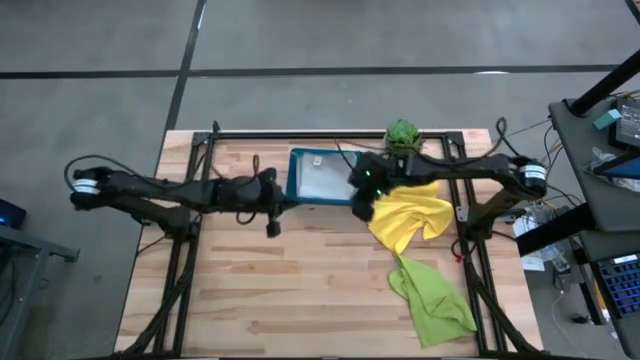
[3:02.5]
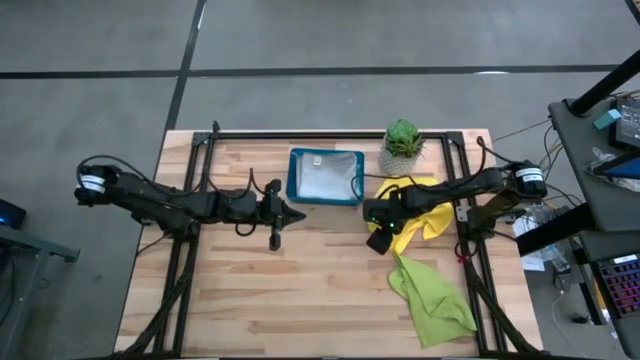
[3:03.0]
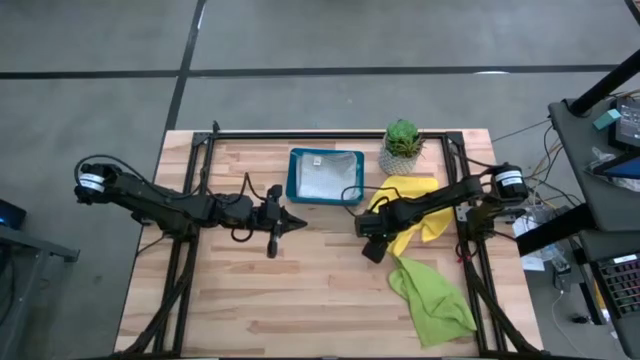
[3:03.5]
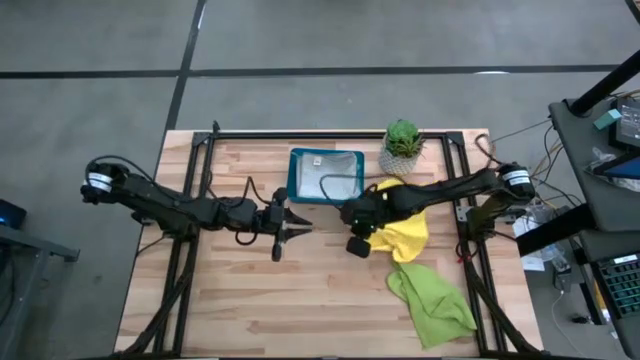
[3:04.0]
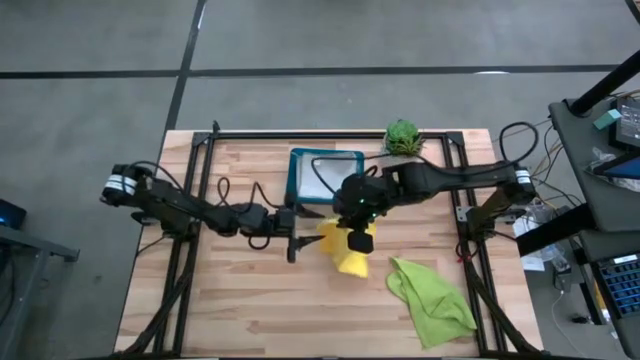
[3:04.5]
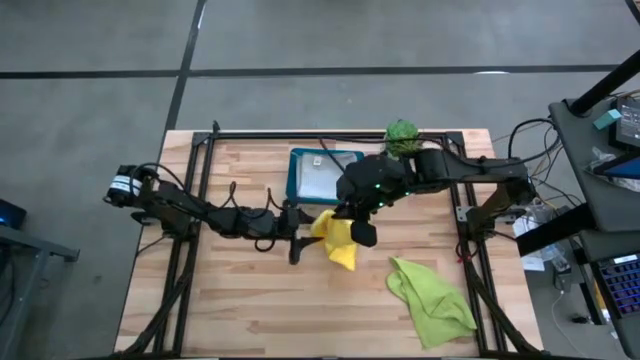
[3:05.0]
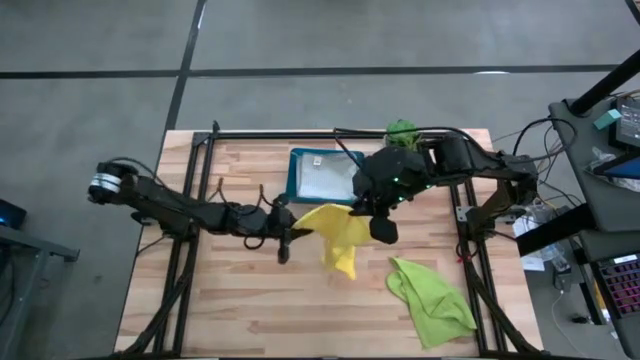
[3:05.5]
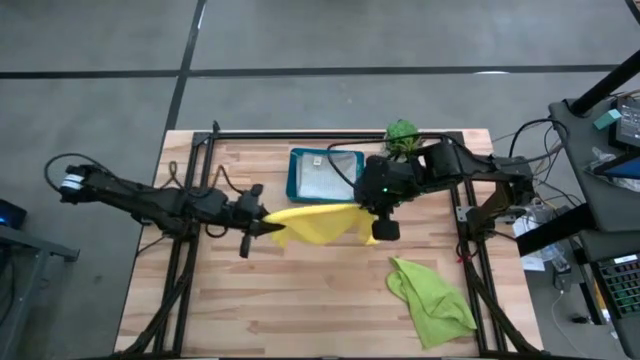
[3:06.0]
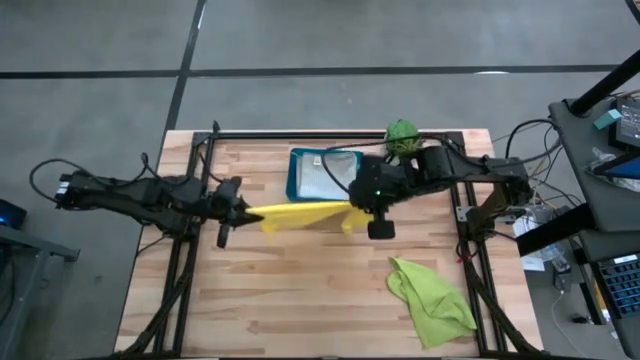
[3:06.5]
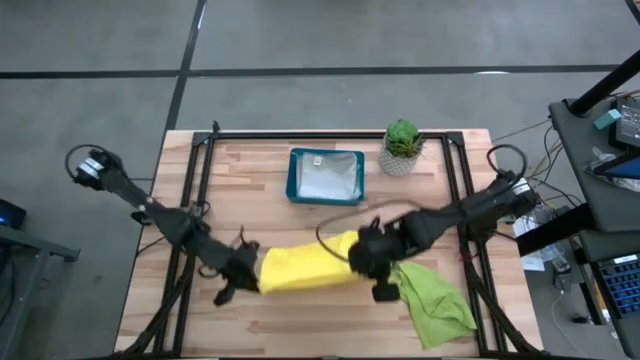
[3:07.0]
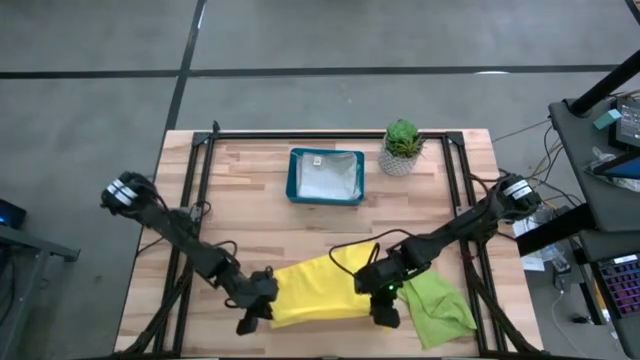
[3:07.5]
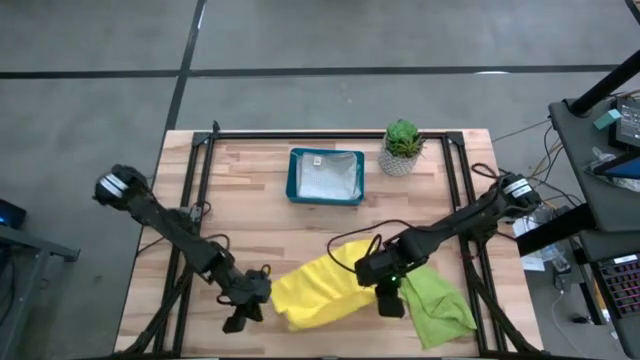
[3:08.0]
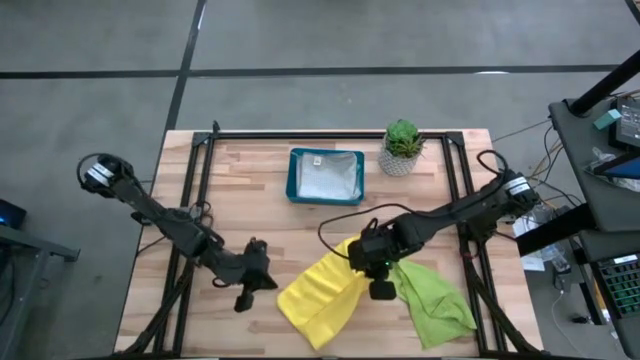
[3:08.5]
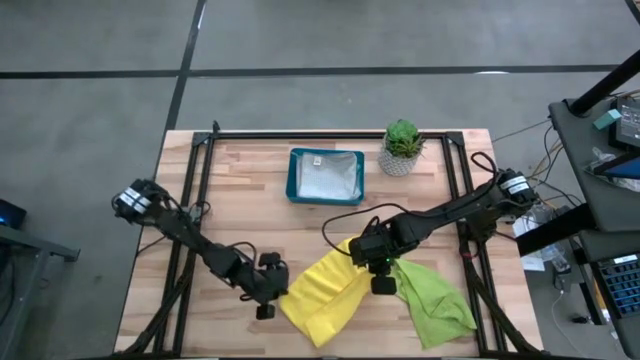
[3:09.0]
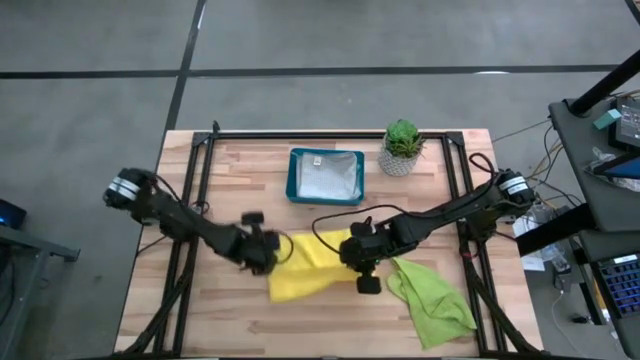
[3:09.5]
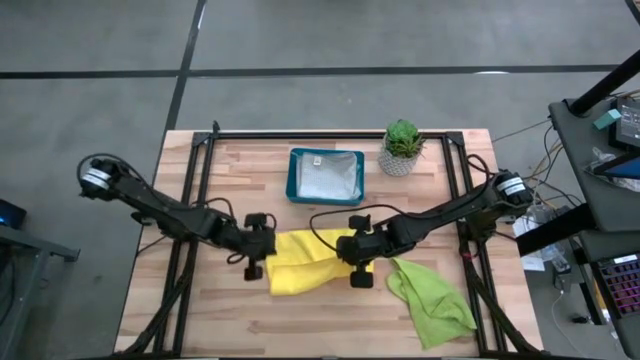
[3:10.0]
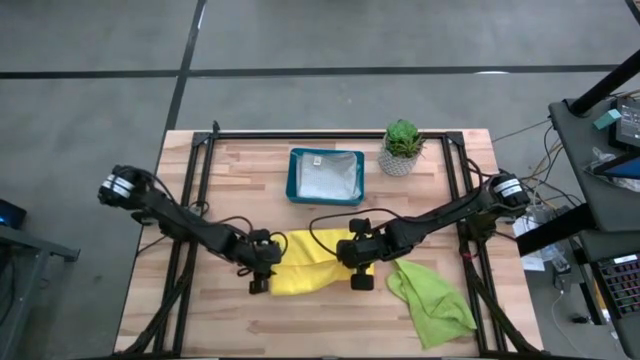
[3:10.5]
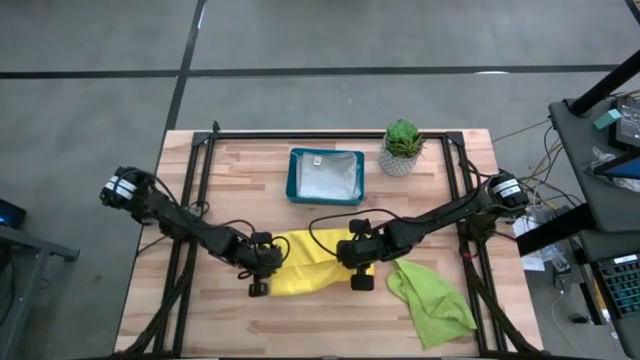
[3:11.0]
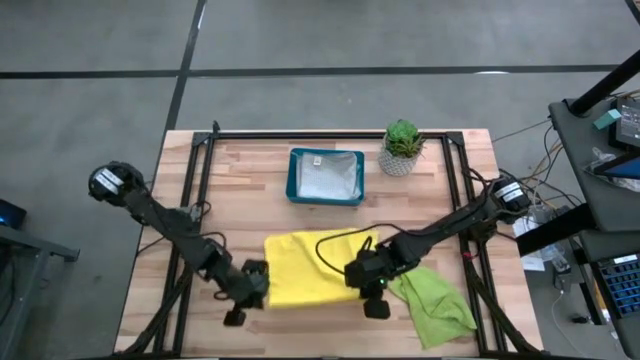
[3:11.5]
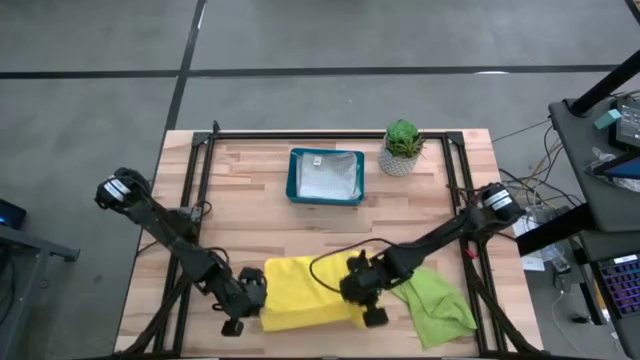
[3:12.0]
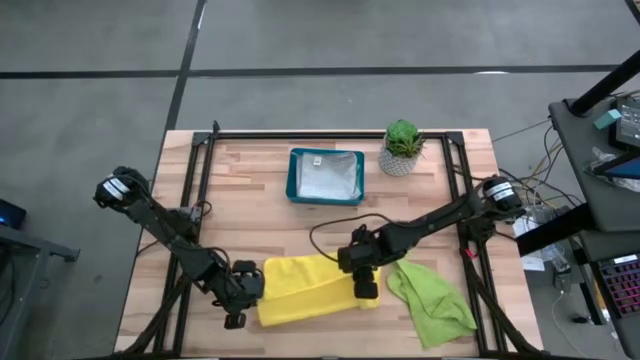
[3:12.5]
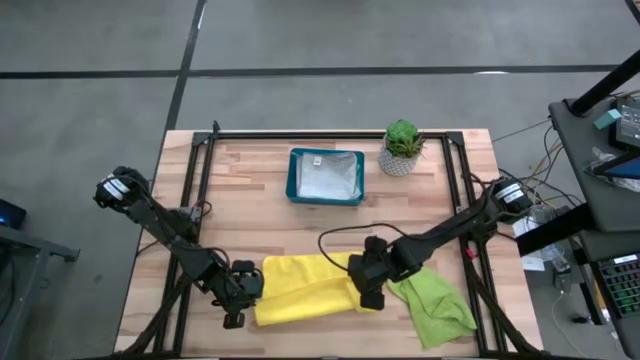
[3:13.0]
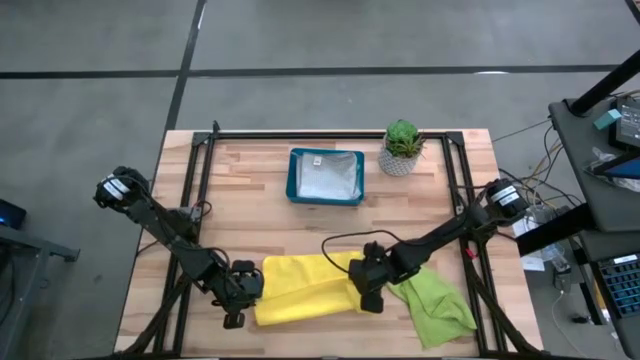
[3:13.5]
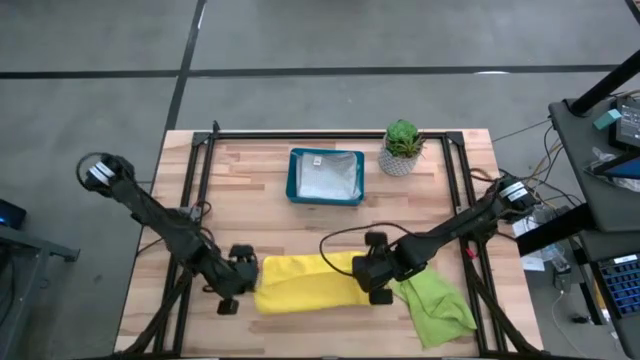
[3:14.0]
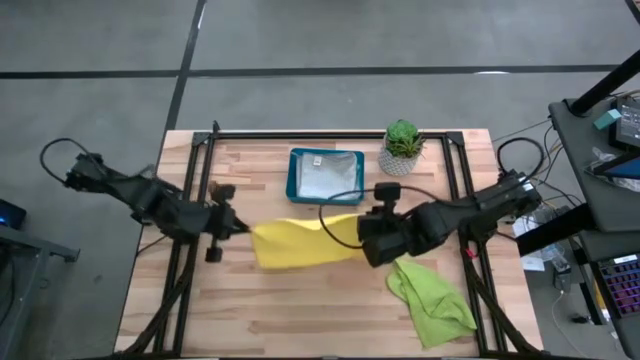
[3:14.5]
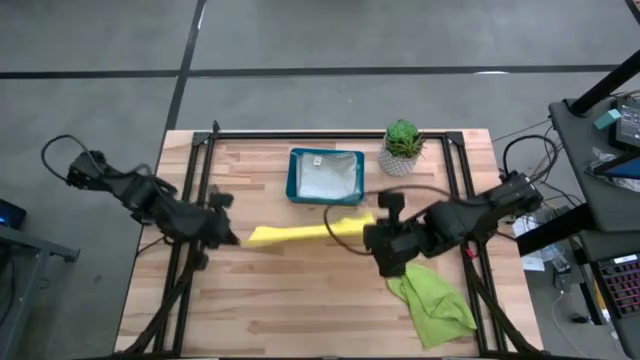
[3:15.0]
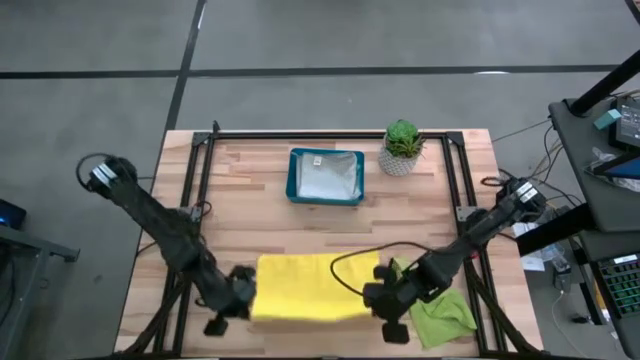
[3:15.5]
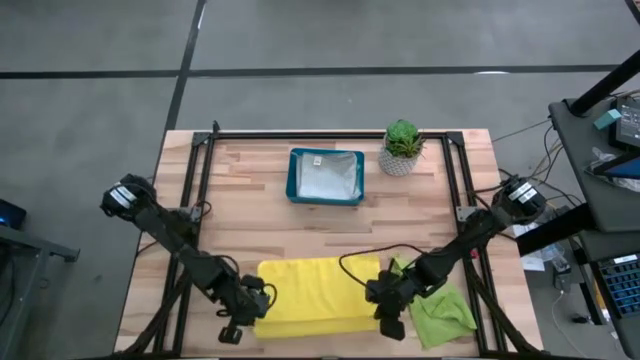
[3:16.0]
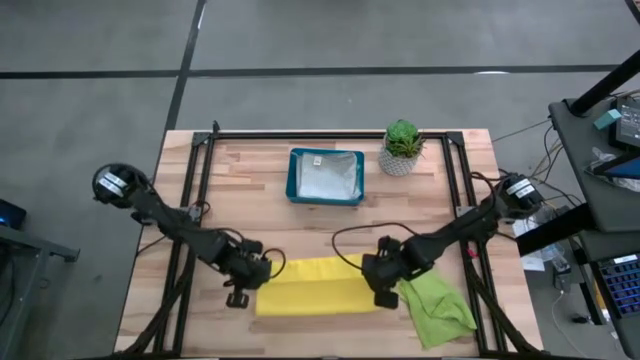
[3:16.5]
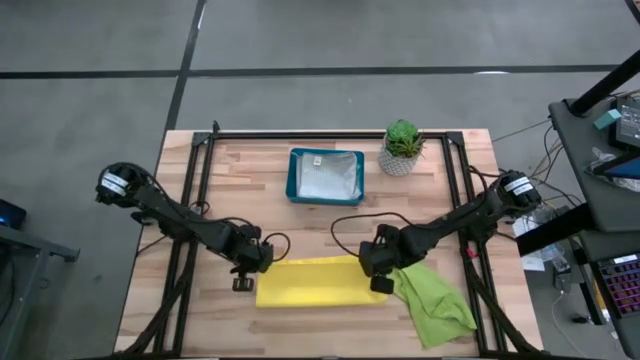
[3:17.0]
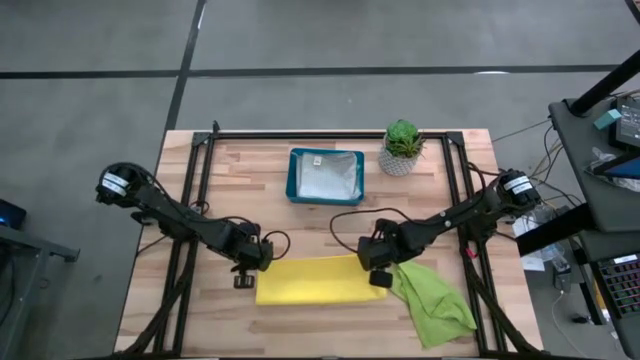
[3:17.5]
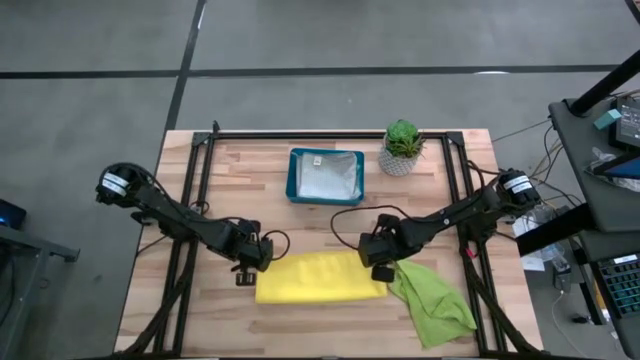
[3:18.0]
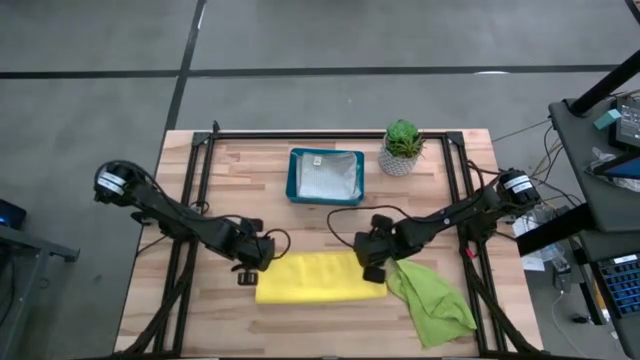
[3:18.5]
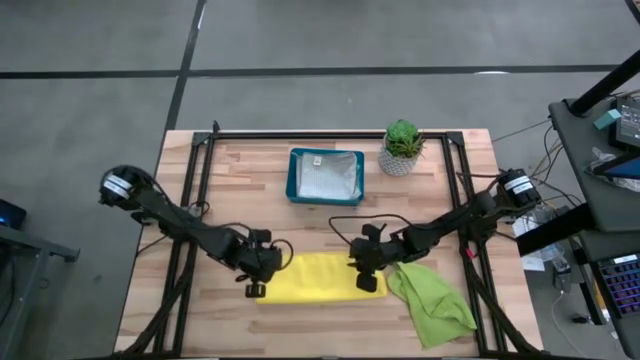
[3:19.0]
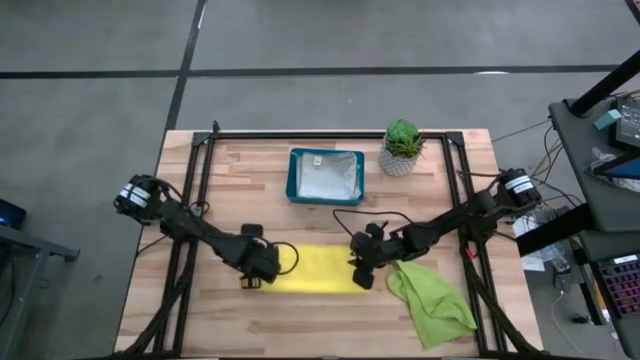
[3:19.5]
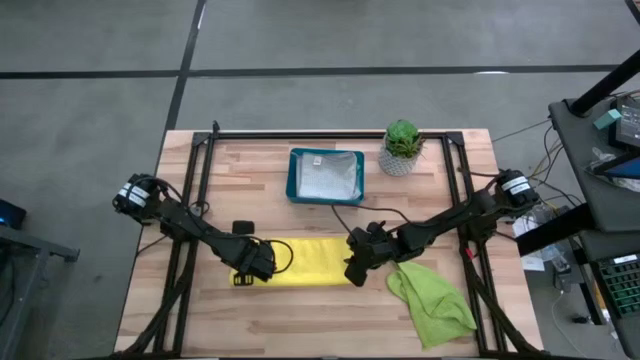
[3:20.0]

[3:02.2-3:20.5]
Task: Fold microfiber towels
Fold the yellow microfiber cloth
